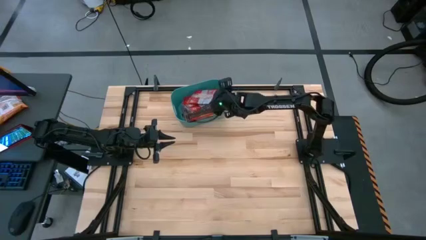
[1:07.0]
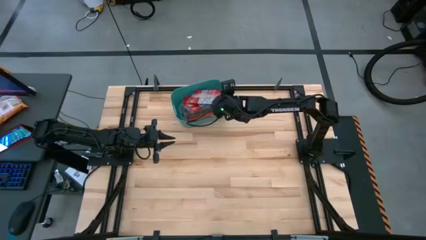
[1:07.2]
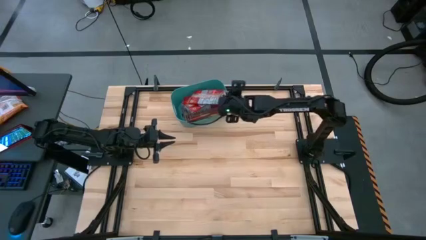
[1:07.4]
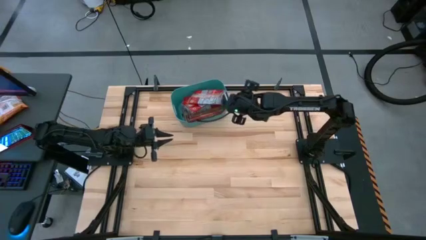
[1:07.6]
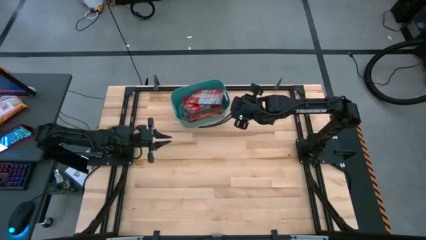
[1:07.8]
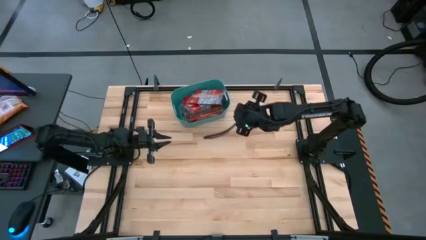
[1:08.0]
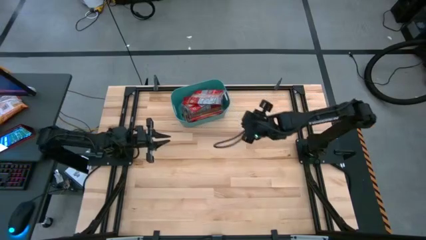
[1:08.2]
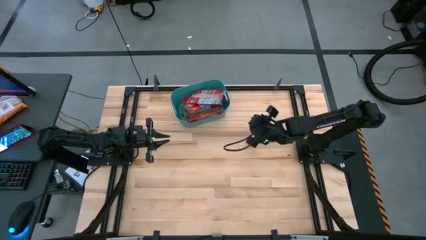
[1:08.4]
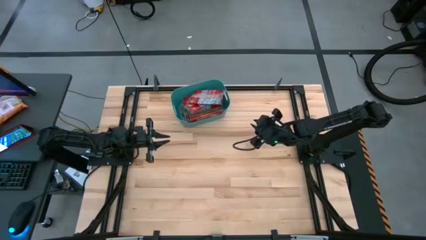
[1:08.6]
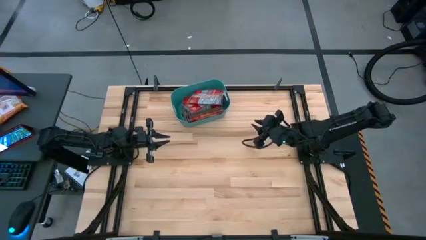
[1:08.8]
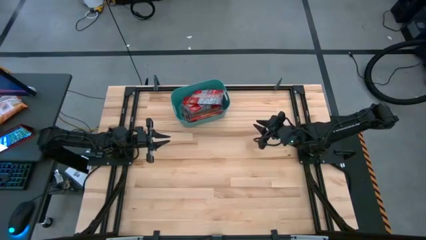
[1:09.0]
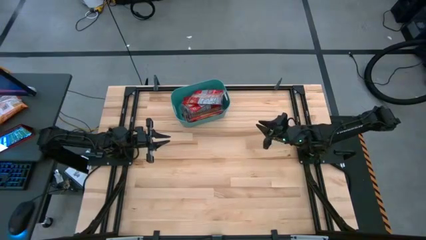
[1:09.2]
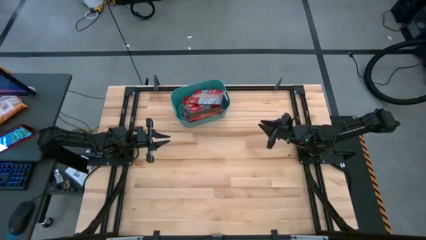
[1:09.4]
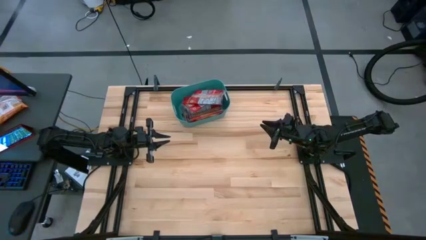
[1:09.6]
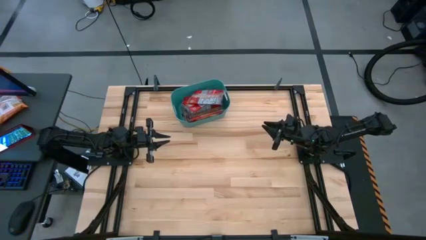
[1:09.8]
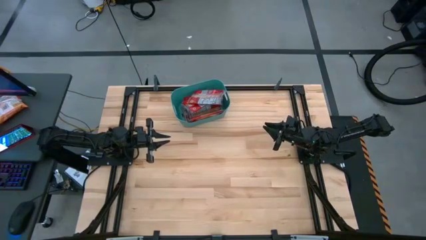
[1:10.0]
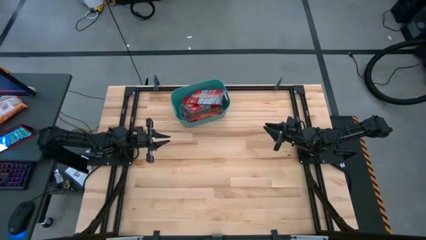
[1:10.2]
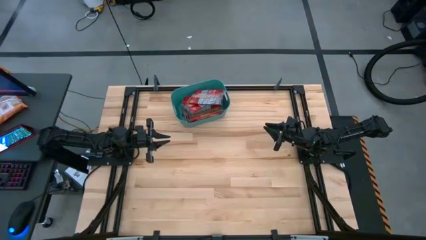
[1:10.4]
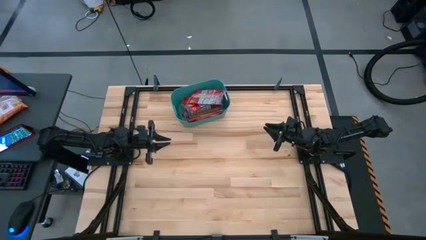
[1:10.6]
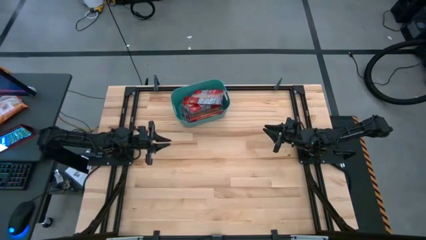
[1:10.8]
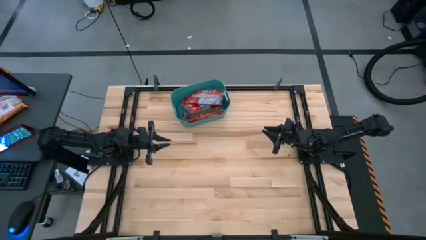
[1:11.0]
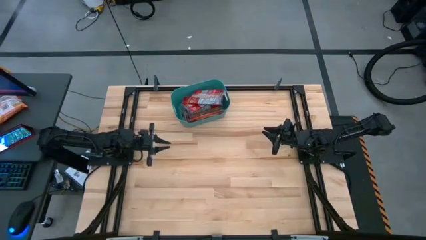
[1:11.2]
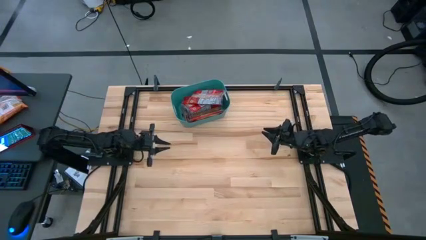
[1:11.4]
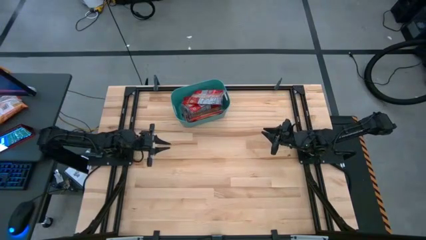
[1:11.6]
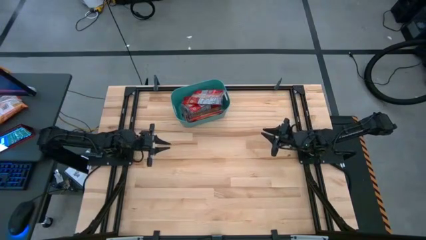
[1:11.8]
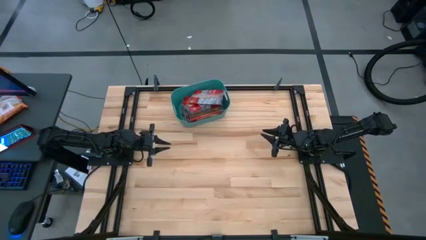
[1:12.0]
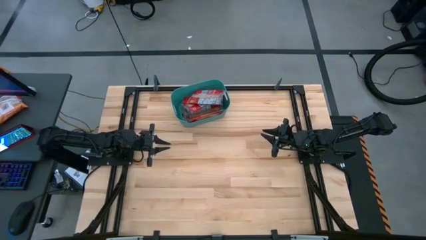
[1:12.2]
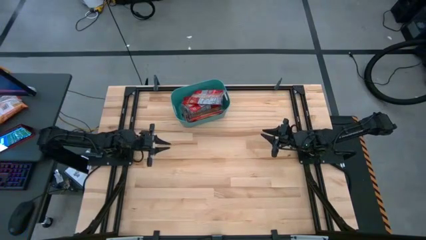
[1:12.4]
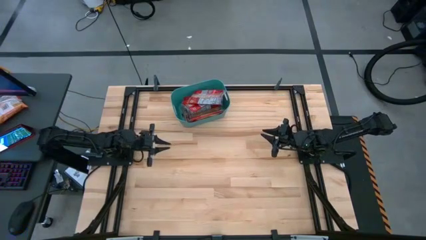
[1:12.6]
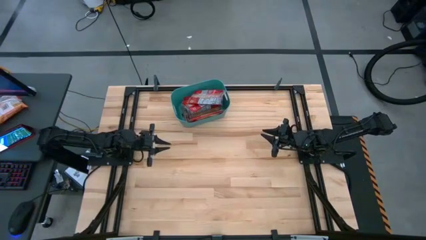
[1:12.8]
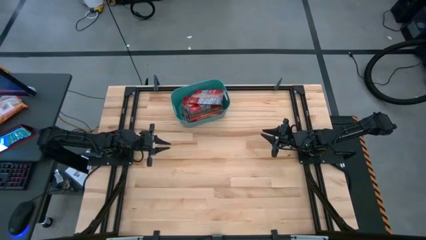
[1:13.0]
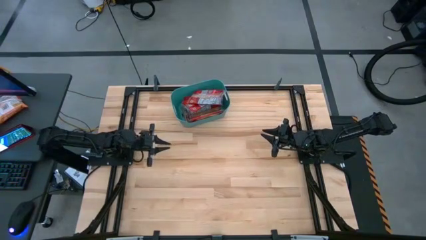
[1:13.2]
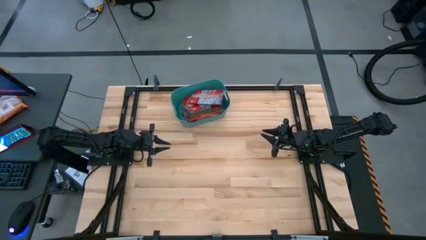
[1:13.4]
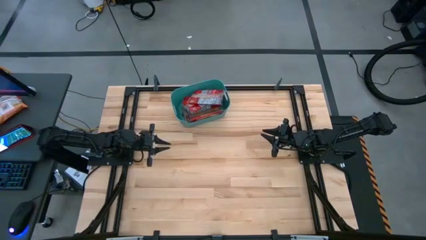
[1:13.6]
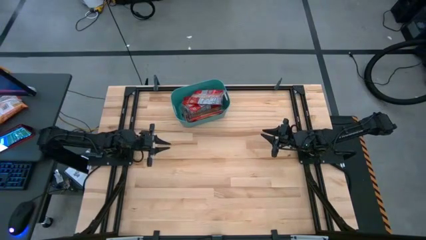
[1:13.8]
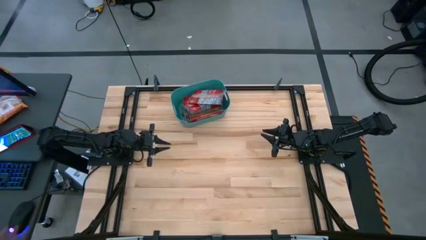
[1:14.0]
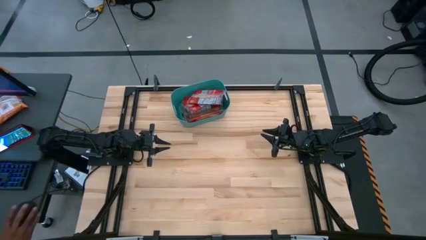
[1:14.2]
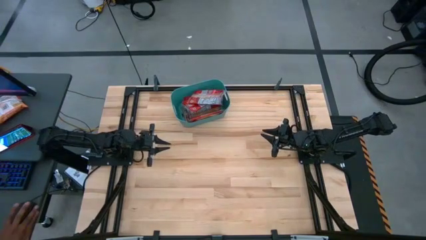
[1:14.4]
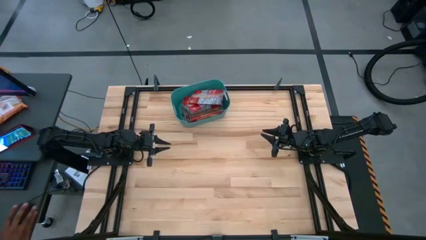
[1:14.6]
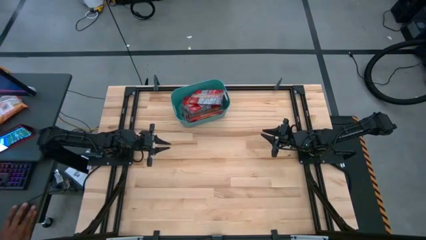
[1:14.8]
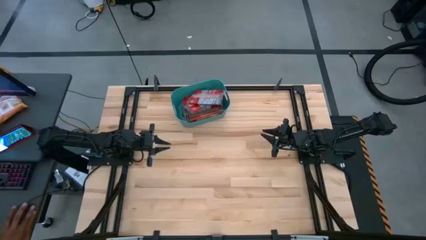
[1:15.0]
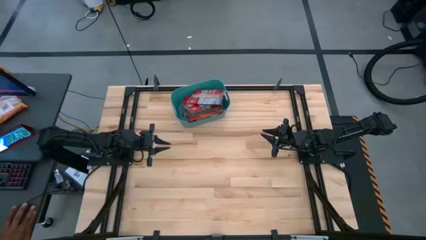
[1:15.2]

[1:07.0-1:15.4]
Task: Sort popcorn bags into baskets
Return to Home Position

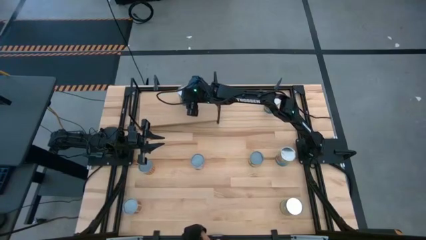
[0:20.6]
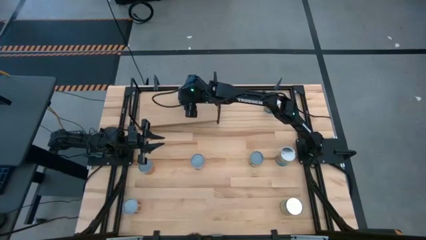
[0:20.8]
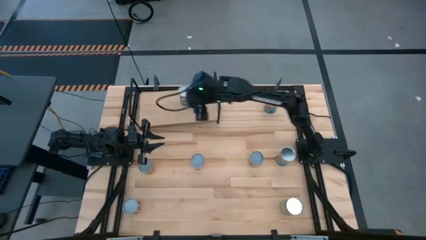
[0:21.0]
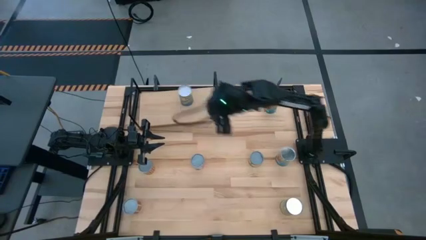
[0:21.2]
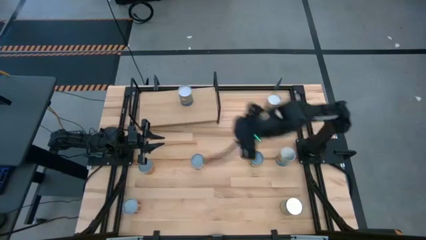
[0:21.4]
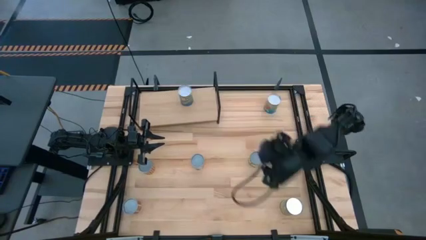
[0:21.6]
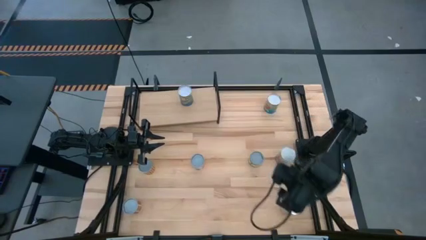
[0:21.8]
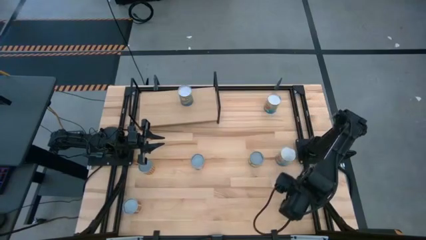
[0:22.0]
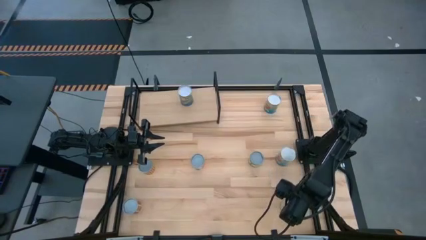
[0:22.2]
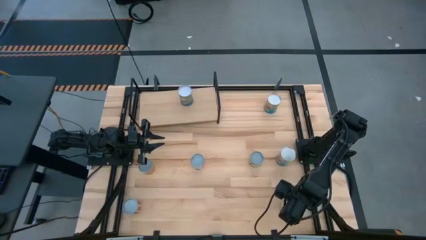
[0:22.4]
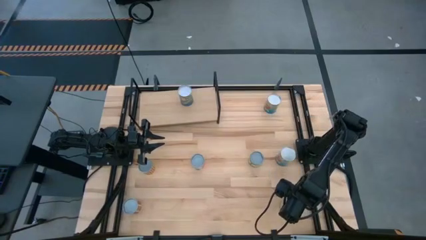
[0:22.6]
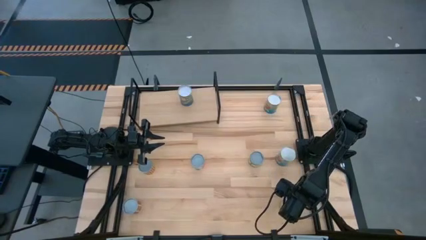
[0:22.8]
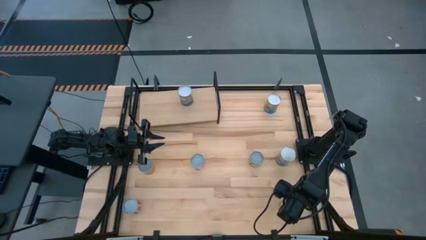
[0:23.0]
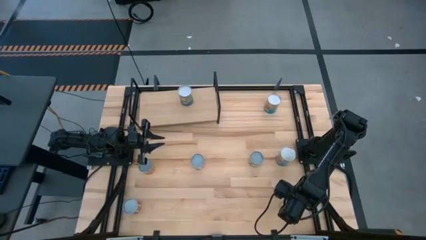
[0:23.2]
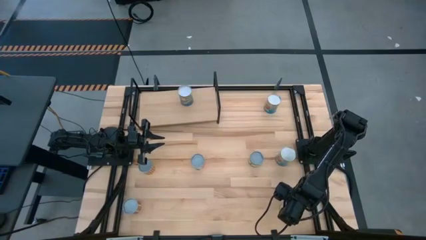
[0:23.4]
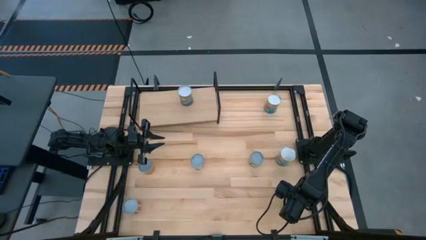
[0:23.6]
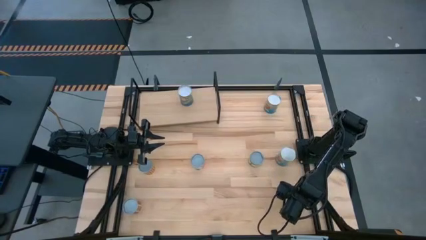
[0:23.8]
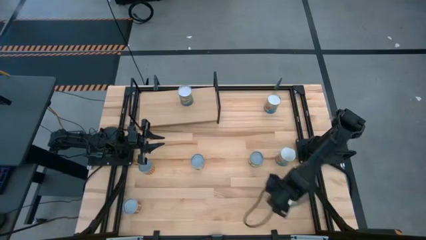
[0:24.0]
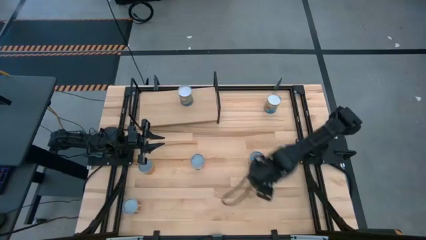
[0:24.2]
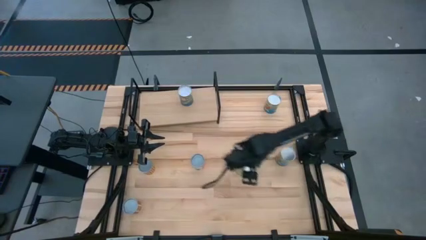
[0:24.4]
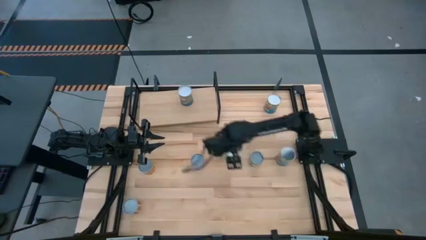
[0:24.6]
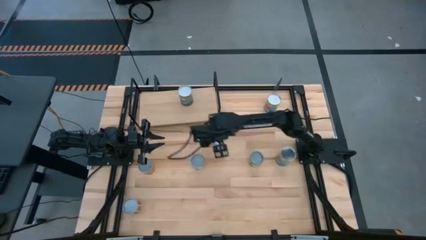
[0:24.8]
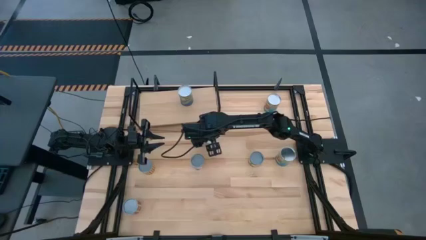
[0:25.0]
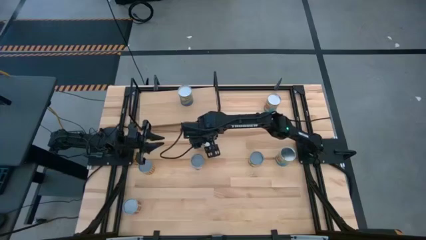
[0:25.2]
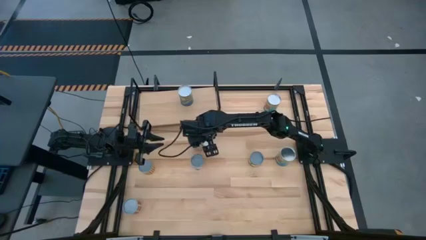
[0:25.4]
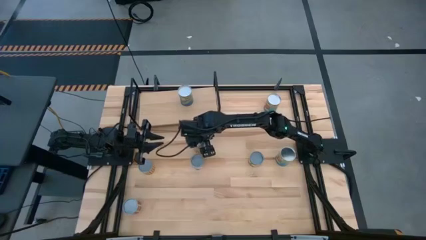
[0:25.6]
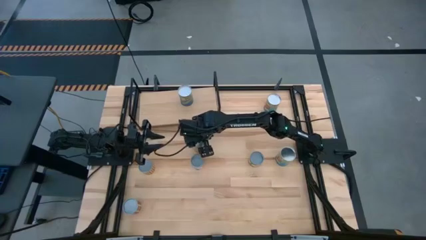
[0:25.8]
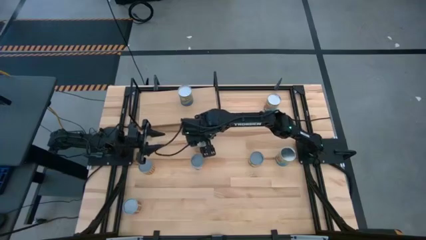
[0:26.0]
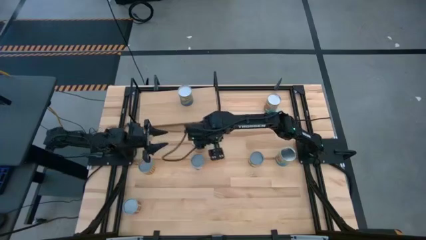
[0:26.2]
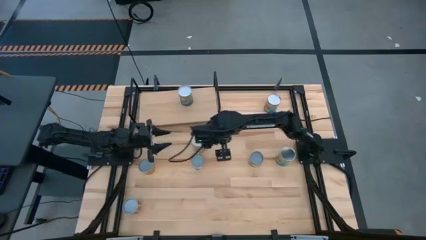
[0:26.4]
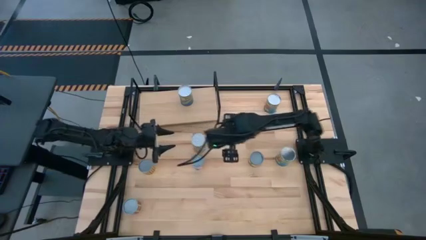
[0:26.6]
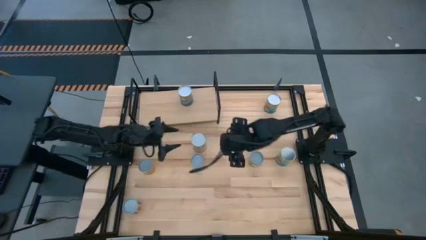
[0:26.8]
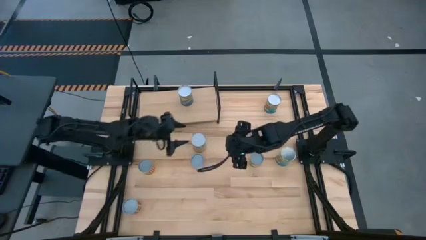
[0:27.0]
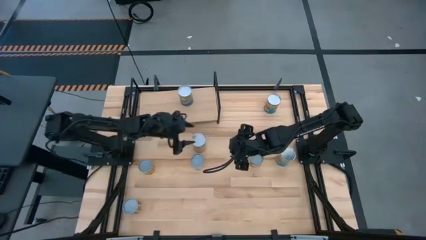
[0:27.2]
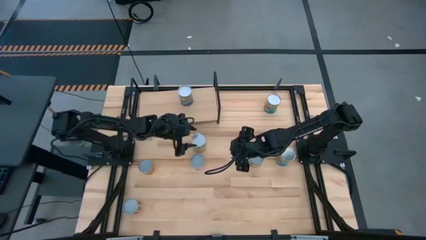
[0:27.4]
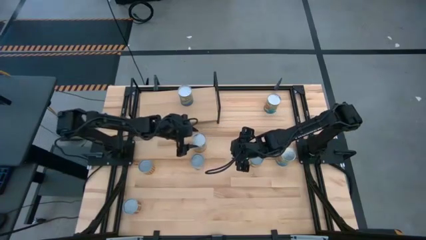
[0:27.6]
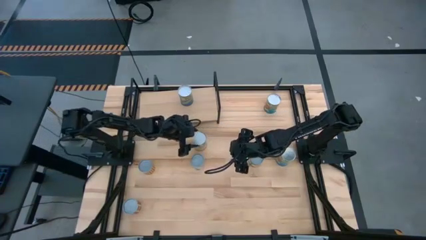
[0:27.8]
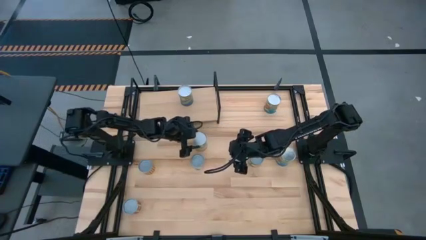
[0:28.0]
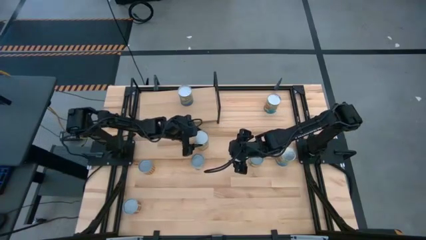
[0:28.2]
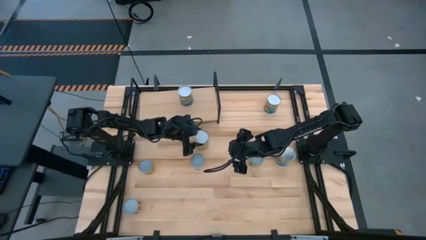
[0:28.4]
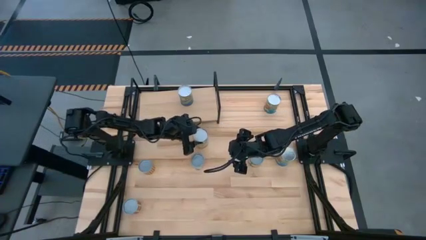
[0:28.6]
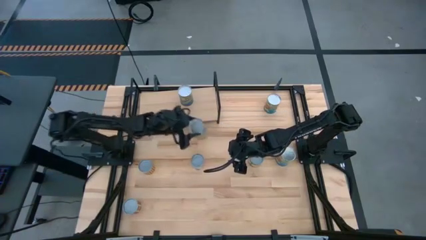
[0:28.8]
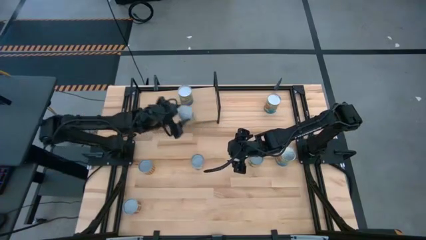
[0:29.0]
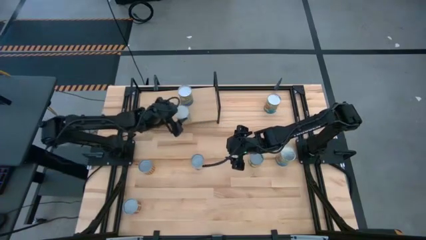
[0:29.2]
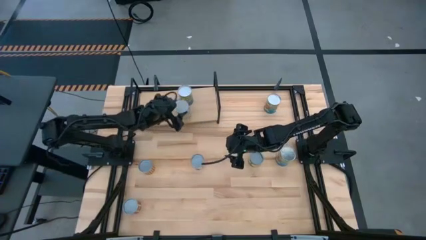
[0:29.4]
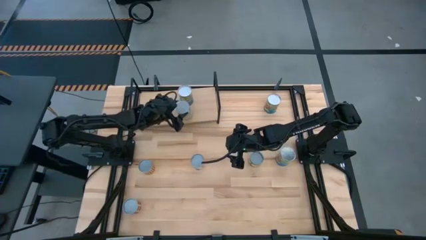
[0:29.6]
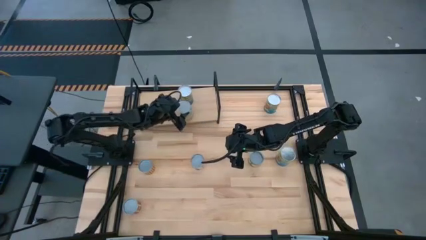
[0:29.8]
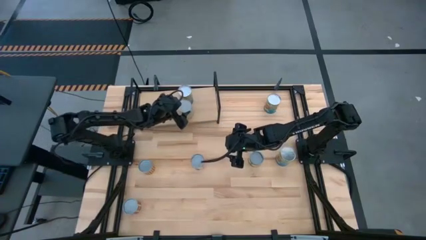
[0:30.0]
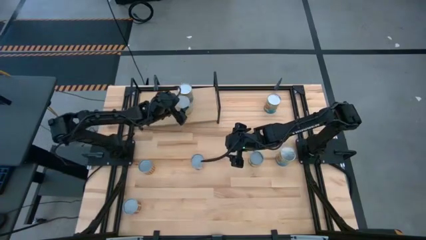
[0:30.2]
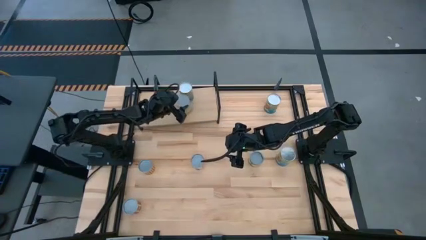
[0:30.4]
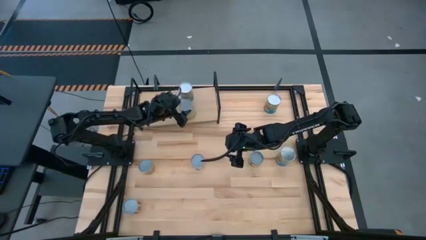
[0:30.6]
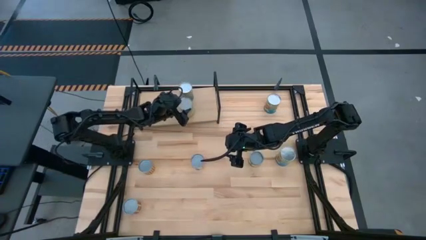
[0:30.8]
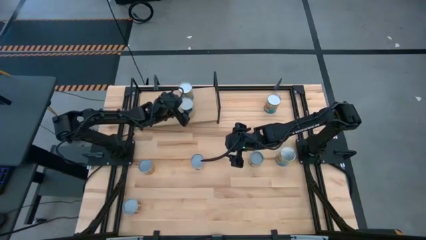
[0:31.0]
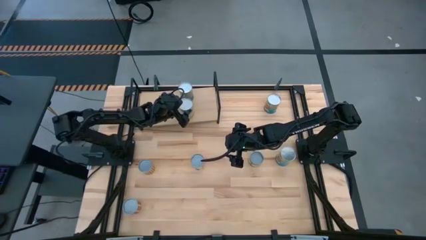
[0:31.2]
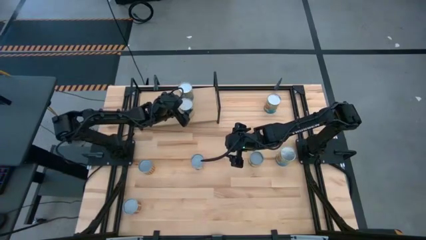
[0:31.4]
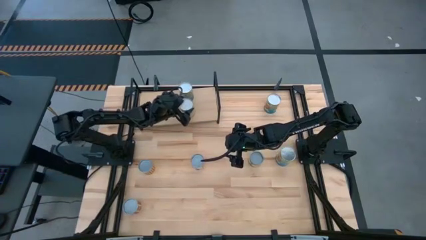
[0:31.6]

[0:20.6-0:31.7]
Task: Pick and place cans onto a shelf
Put the canned carrots on the shelf
